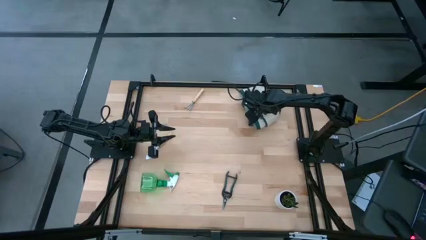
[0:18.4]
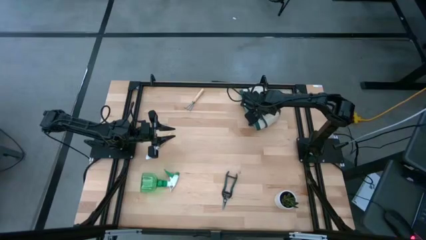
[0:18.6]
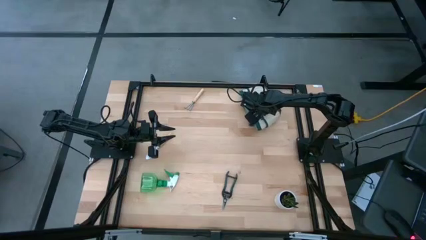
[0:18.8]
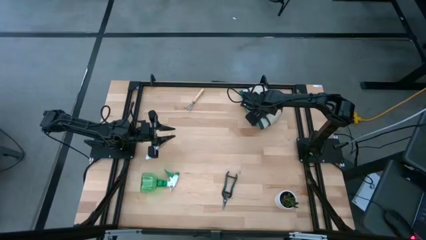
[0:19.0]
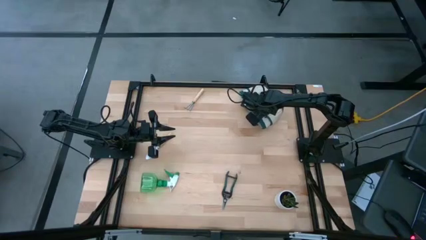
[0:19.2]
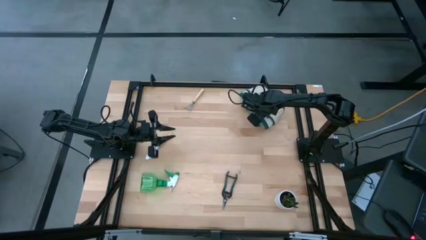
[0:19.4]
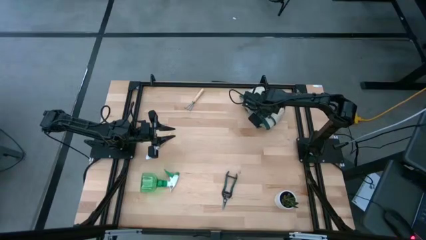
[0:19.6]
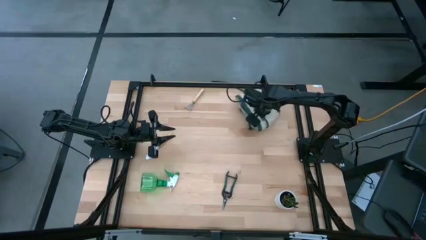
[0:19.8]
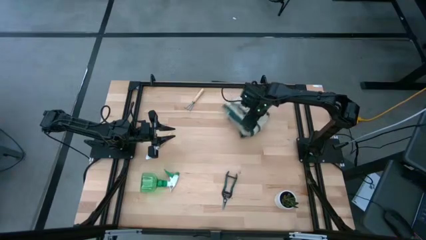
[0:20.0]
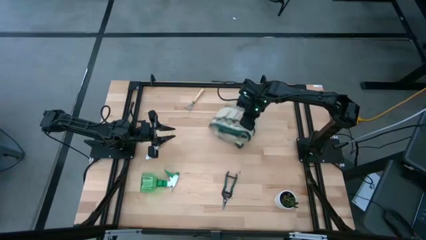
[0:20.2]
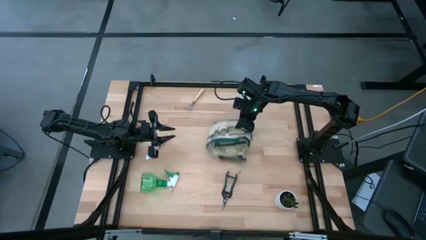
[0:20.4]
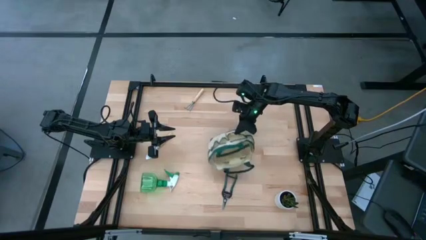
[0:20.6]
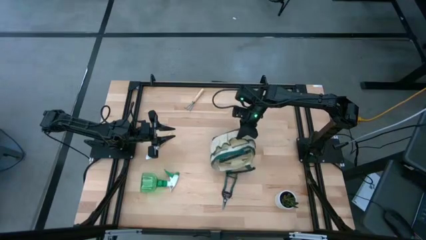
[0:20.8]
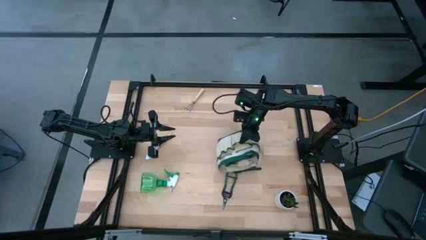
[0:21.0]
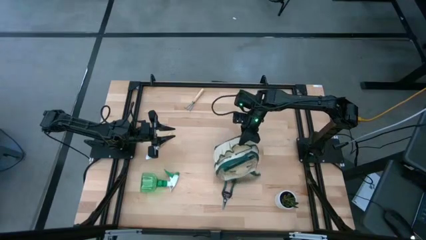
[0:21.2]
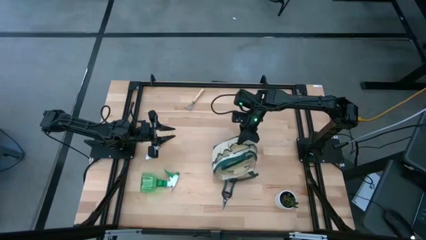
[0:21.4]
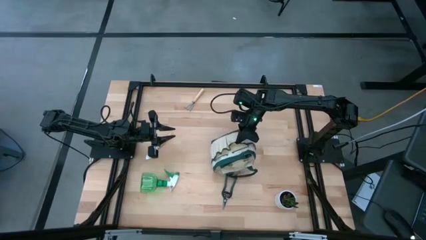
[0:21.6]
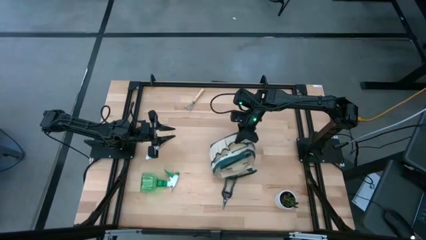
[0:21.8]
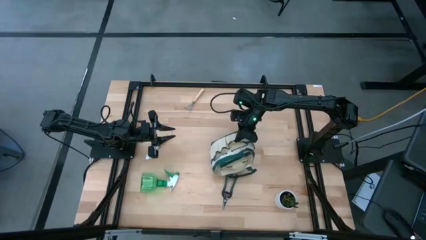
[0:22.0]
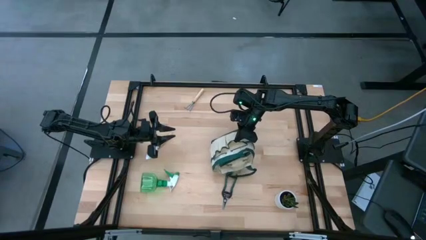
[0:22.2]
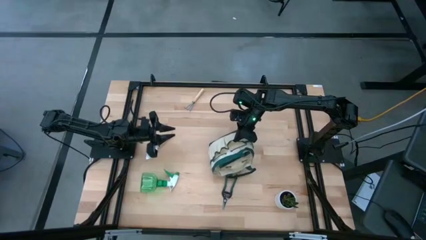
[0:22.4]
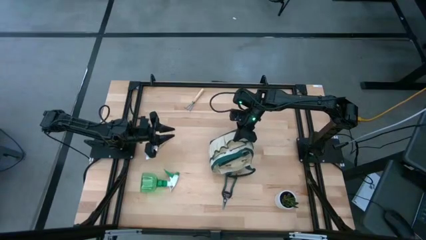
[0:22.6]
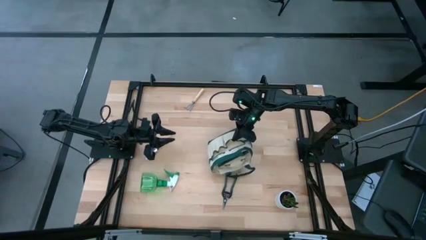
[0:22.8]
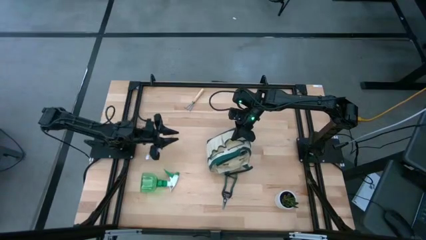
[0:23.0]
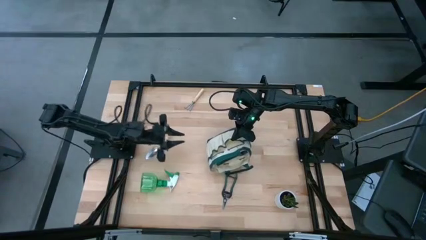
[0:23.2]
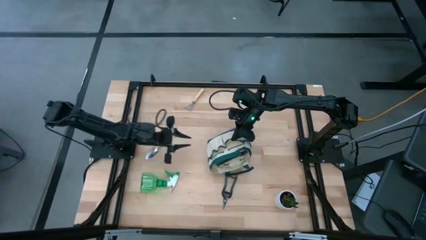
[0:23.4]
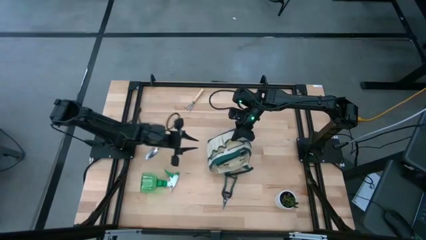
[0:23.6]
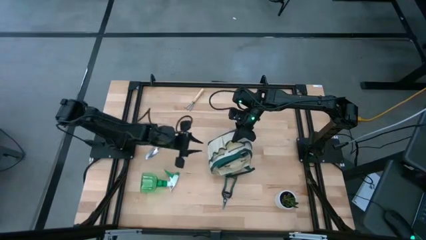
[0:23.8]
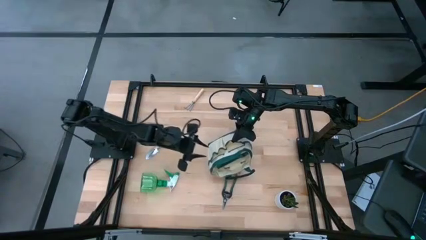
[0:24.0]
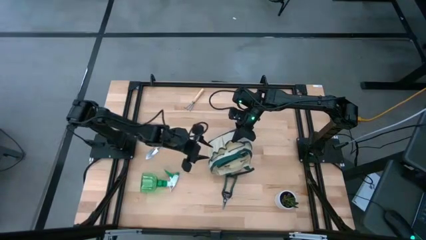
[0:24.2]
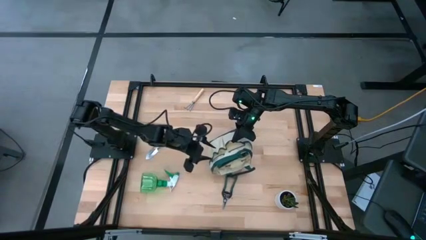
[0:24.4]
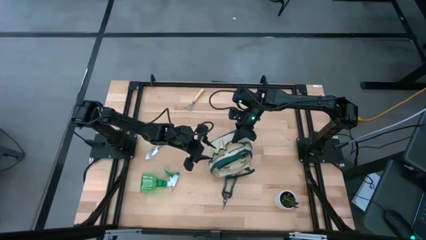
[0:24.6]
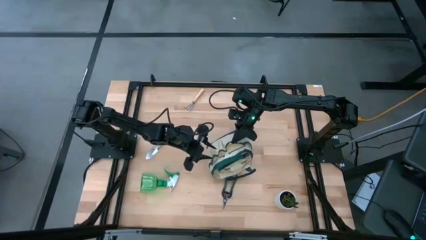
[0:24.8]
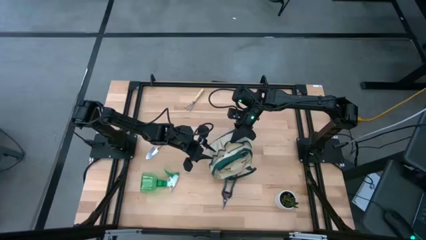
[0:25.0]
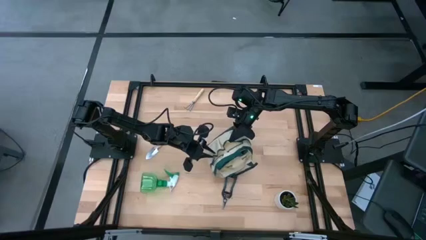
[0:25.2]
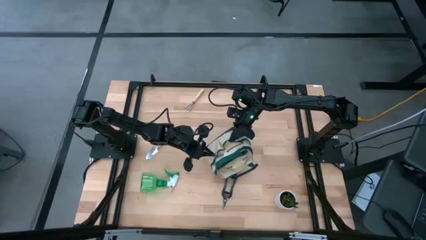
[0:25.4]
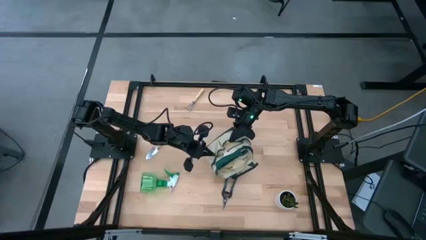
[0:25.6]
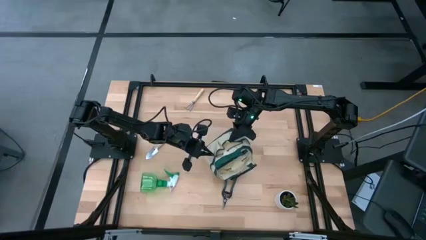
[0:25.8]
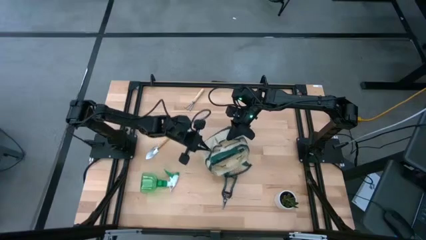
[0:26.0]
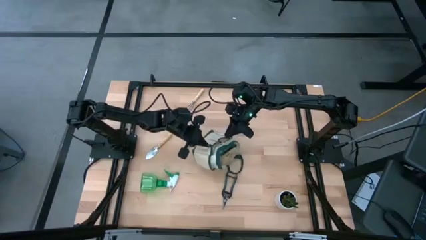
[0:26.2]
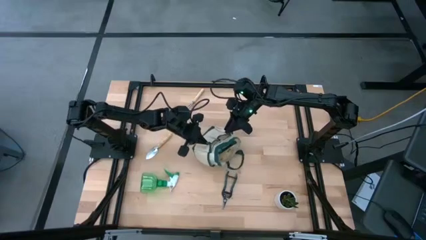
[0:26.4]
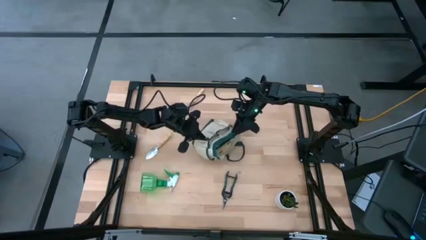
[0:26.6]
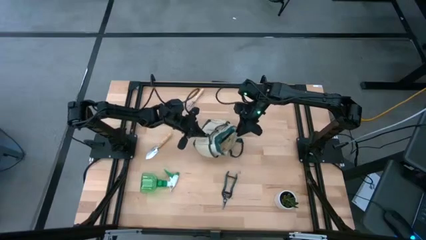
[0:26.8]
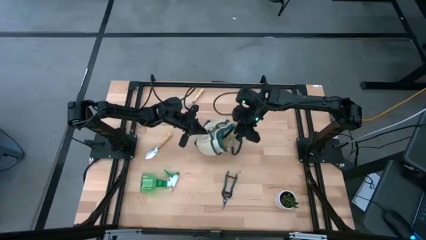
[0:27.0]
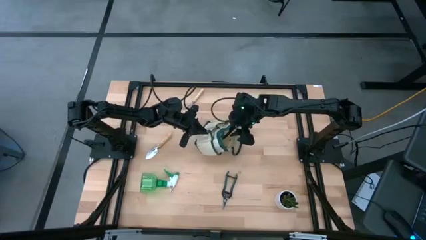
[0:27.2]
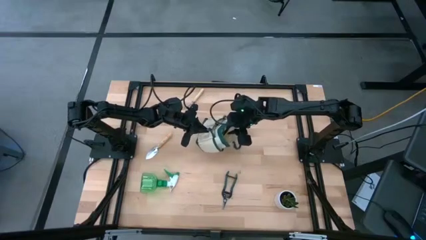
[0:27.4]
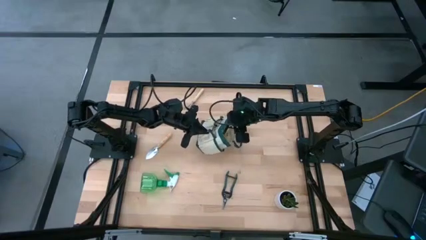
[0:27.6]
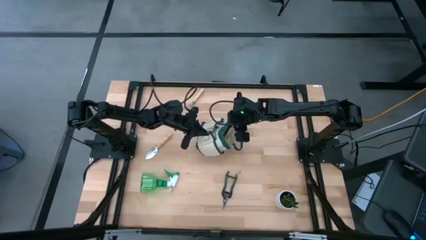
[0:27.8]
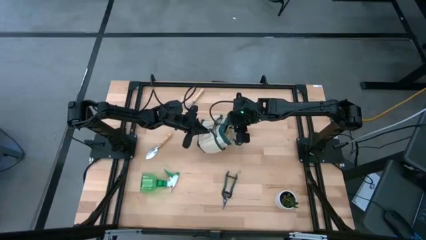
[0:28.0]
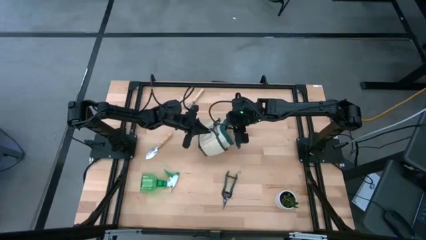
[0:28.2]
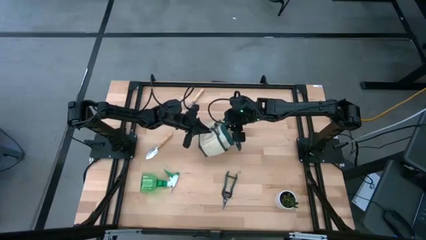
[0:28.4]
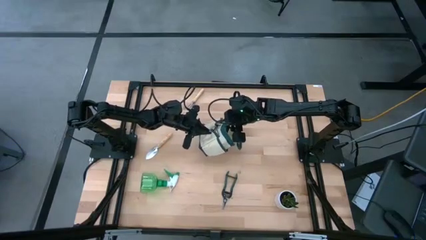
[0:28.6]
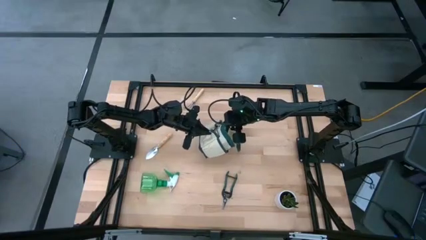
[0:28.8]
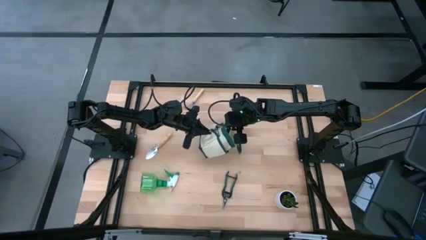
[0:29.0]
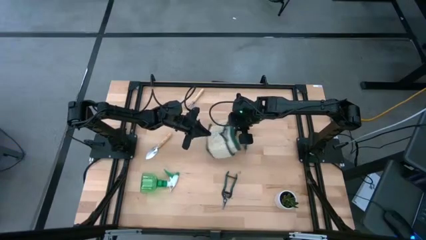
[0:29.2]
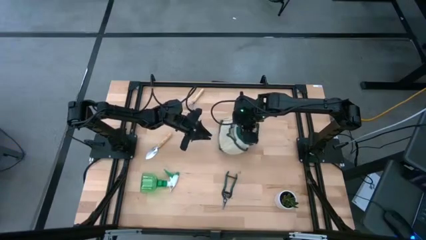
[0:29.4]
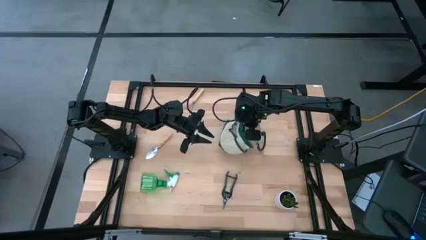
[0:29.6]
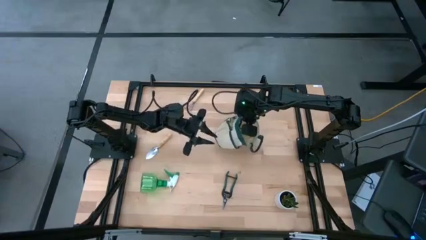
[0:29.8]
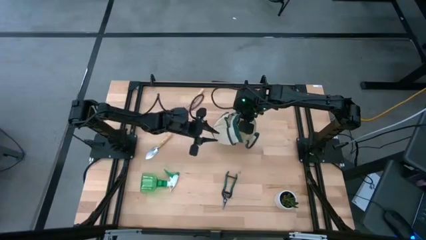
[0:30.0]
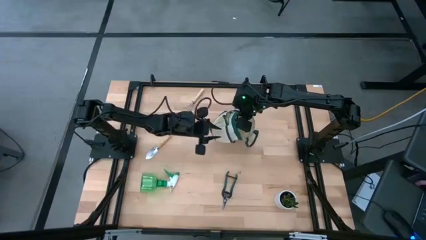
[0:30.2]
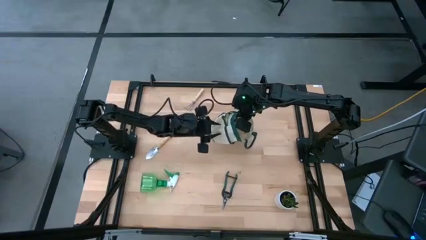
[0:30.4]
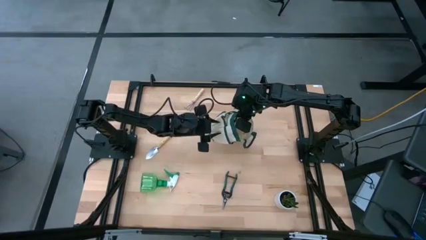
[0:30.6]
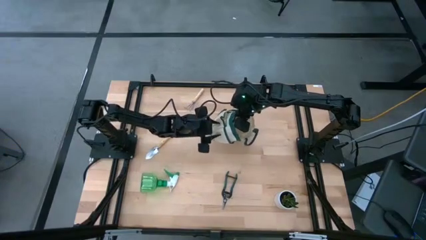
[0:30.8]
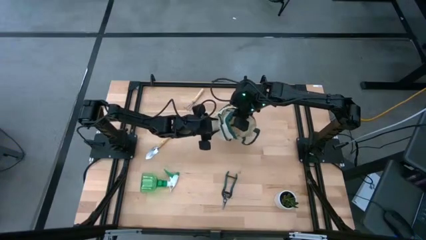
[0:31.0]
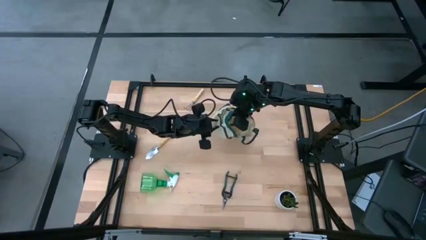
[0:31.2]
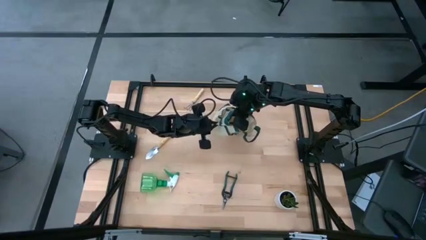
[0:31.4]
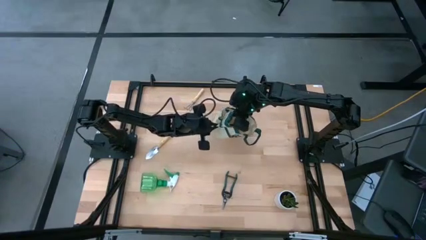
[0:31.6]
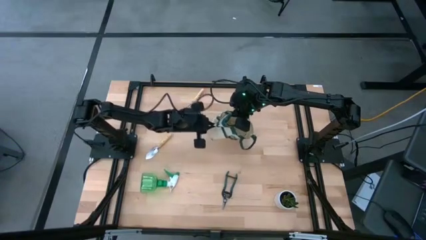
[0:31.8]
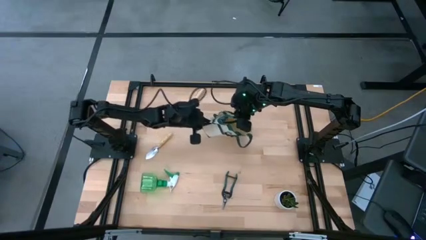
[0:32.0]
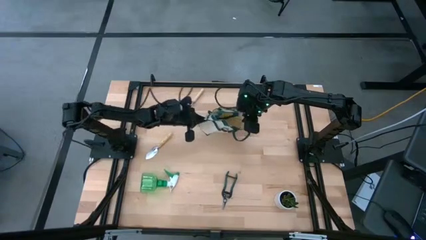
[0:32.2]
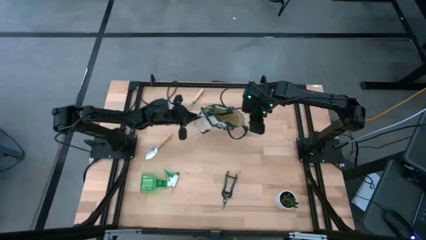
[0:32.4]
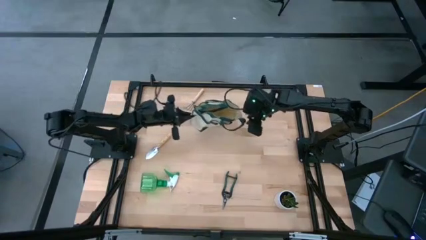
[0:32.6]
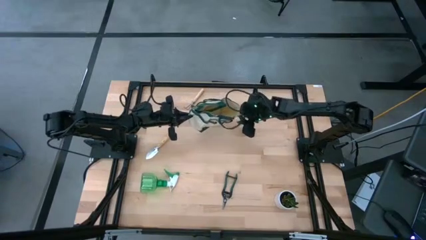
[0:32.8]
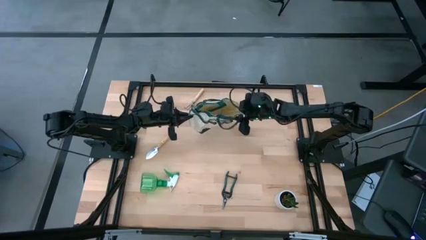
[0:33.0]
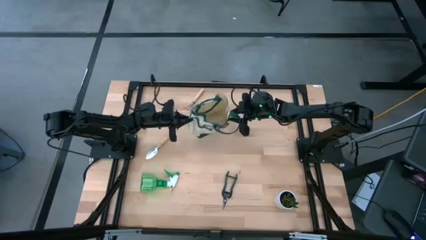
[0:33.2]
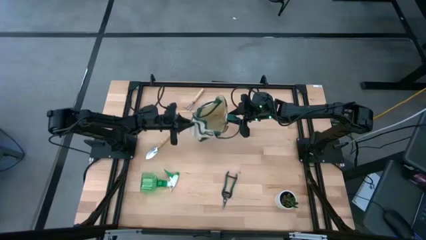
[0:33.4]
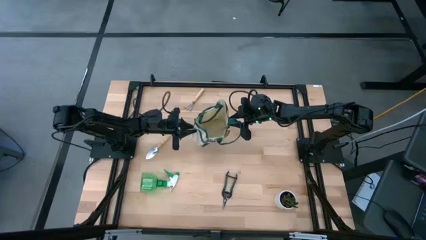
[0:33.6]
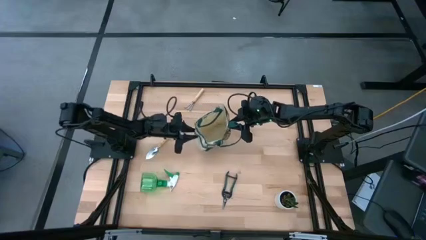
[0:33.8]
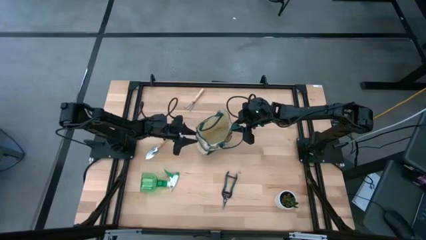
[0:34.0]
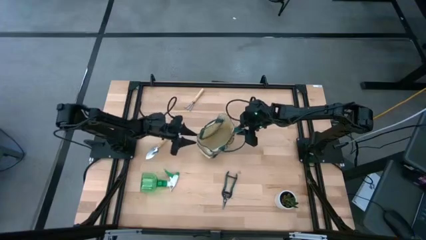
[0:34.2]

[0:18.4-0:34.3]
Task: Pick & Place Garden tools in Gardening bag
Prepare the gardening bag

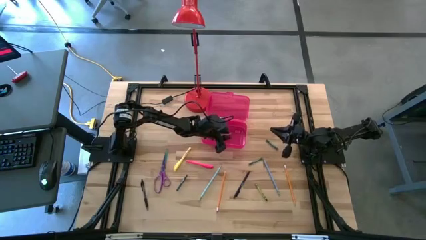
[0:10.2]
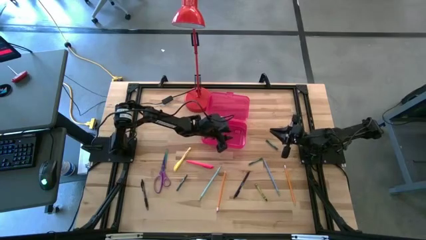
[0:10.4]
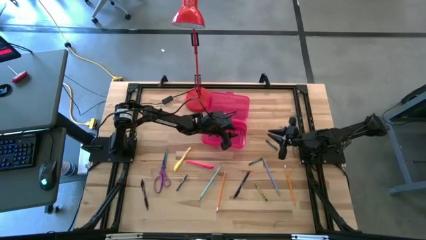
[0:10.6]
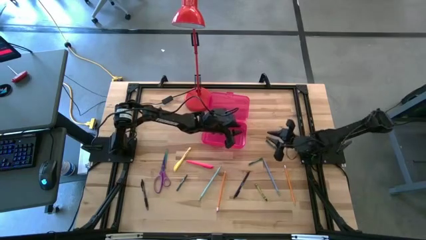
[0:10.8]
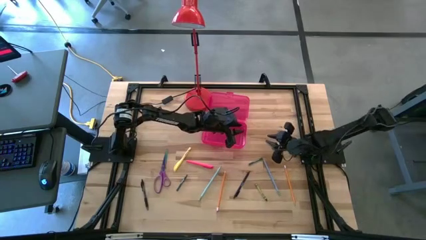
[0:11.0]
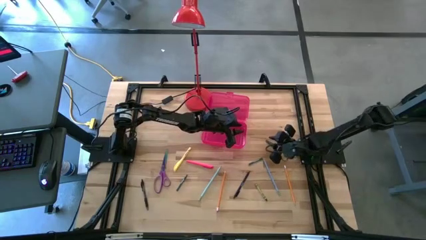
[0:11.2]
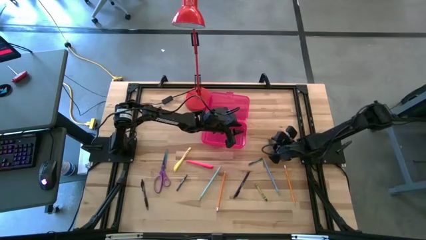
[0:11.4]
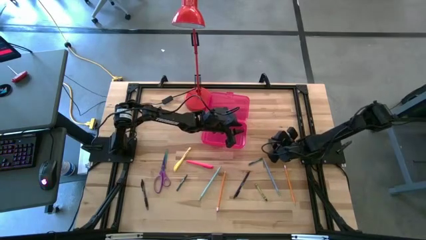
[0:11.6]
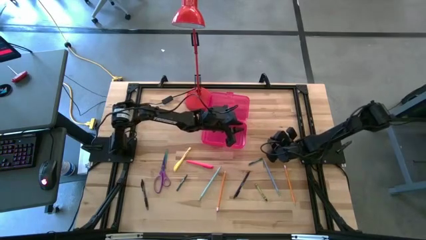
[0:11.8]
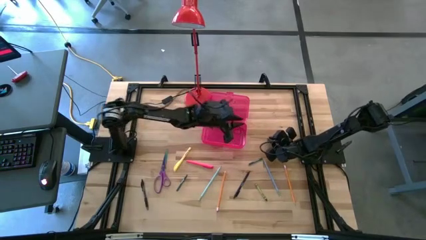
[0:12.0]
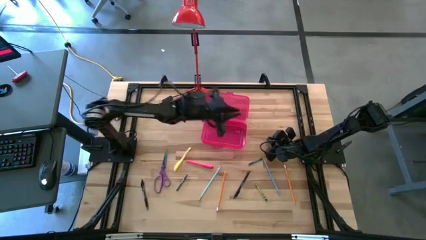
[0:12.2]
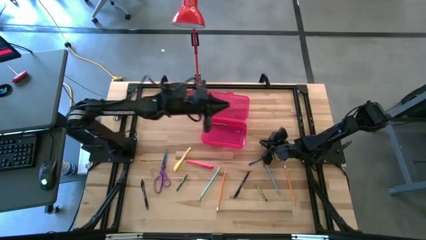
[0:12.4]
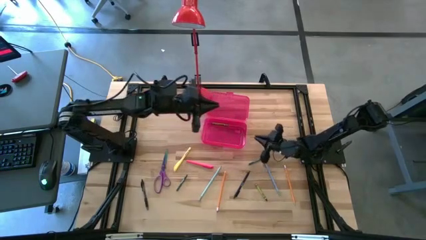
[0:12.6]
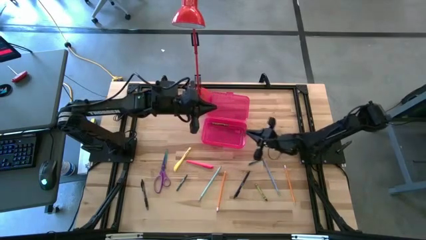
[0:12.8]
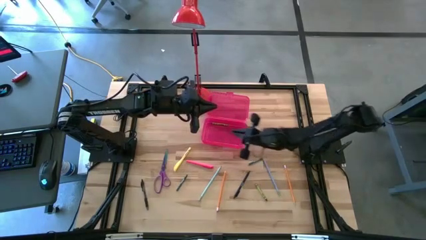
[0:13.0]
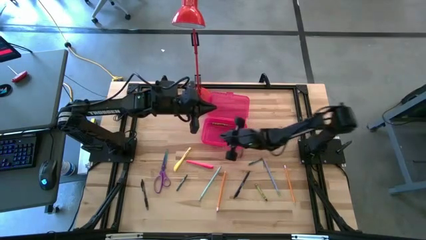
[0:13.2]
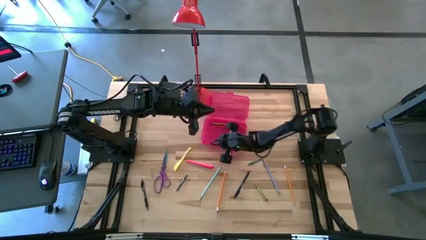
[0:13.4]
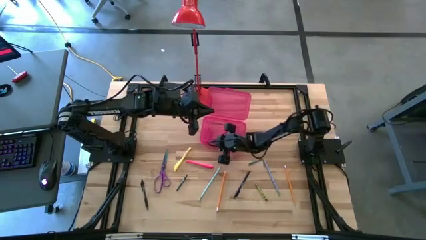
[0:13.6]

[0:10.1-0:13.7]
Task: Pick & place school supplies into a supply box
Put the dark green crayon into the pink supply box
